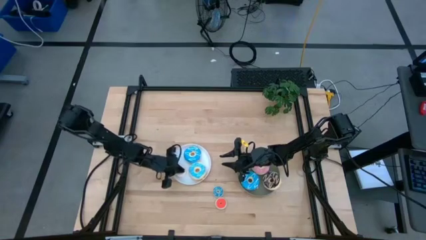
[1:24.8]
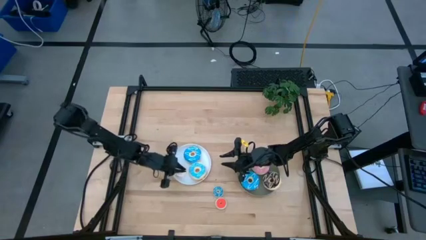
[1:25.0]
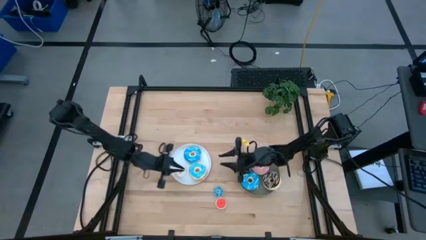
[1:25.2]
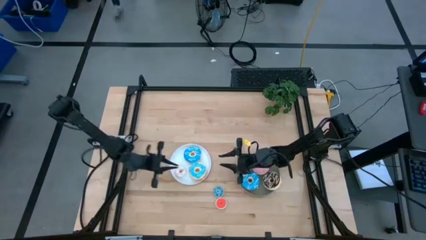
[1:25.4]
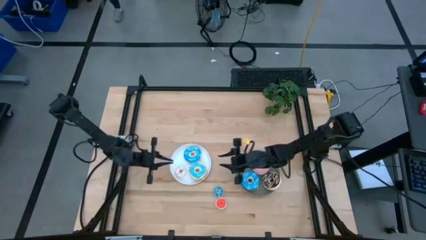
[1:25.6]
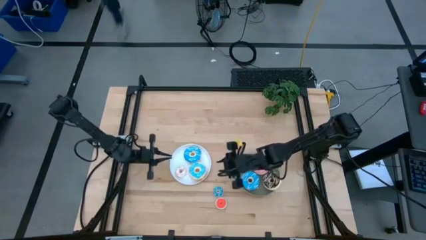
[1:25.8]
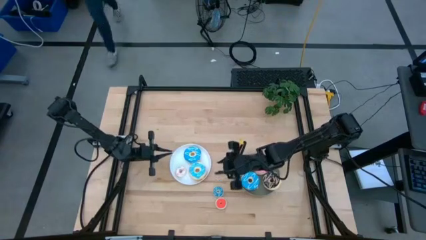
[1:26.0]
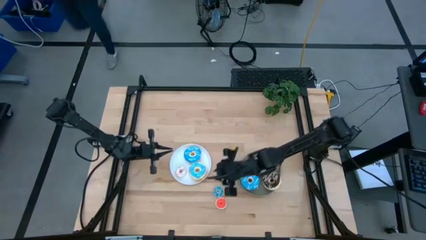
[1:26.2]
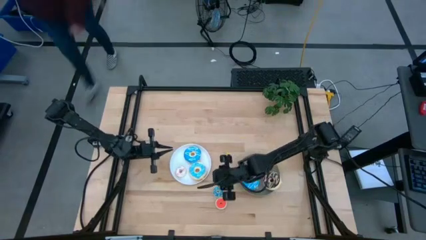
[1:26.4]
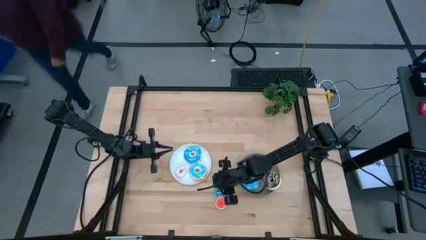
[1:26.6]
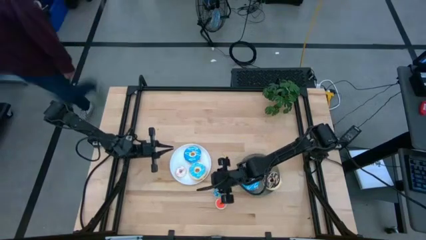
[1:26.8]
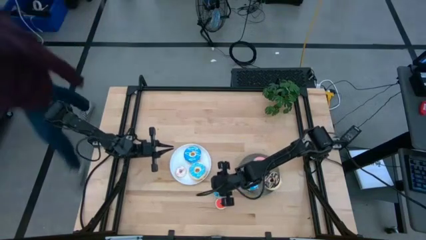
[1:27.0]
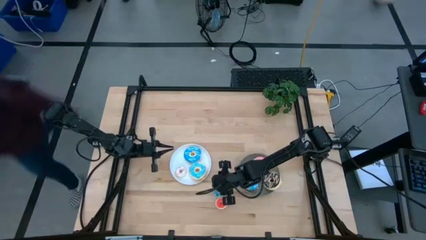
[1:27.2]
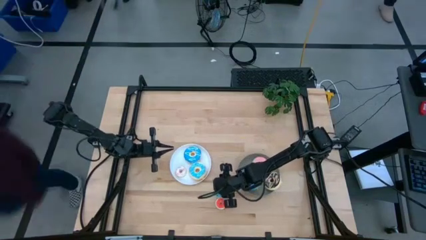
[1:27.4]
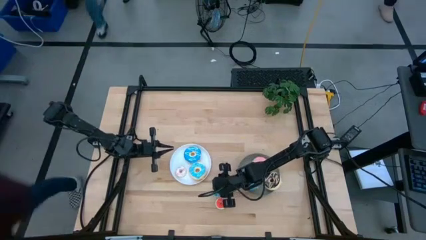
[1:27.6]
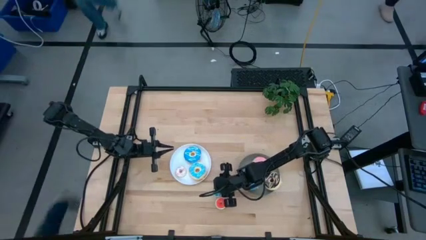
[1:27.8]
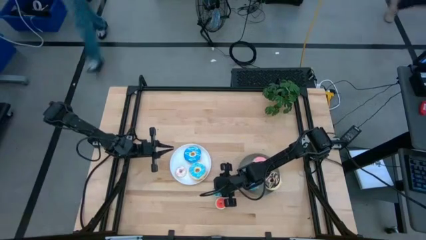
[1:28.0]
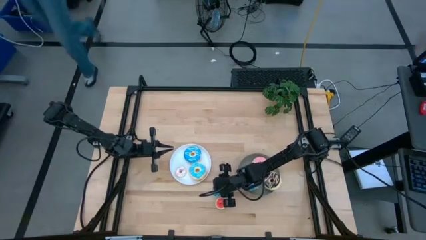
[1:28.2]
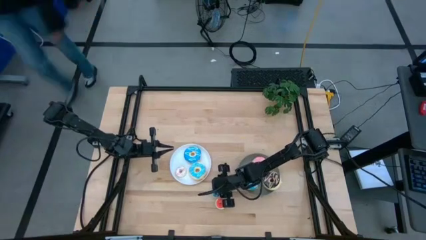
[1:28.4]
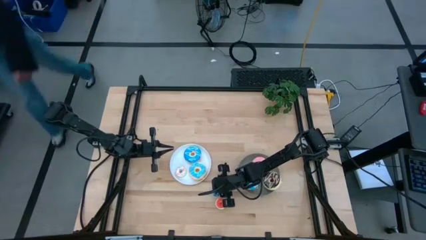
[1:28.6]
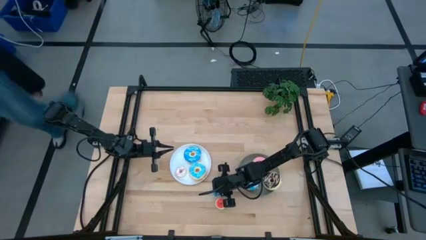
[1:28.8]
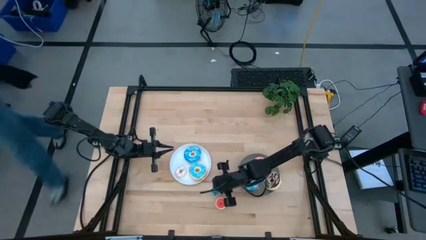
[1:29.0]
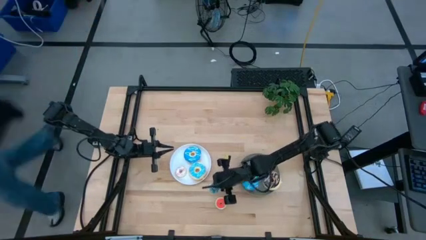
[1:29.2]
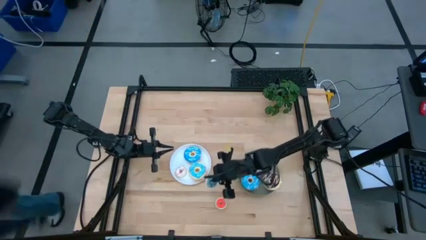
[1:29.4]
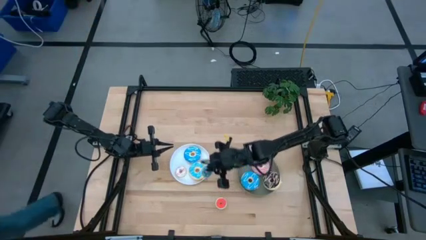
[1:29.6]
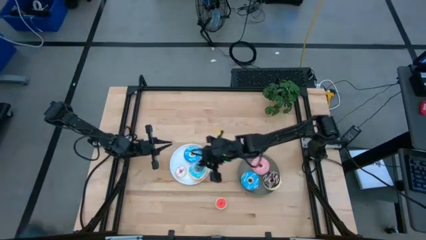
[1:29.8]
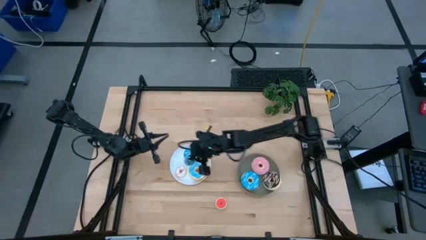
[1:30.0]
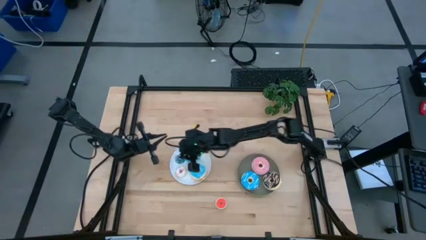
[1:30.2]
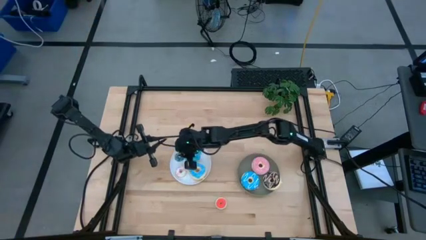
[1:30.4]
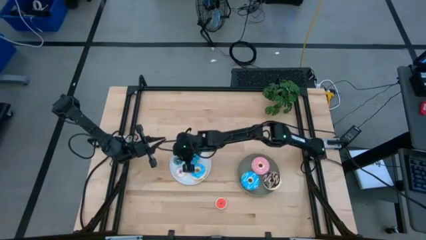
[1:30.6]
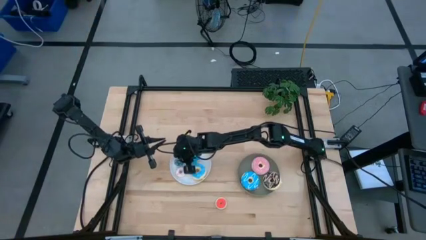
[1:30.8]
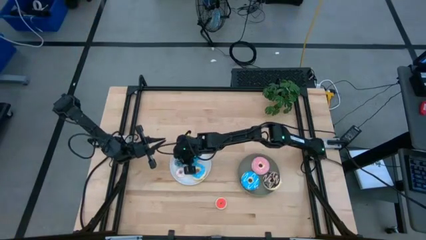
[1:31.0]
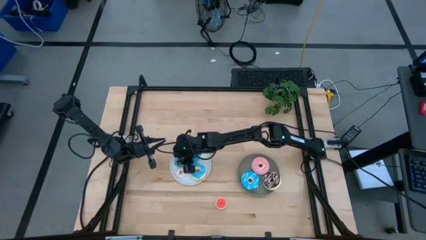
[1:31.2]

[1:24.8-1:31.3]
Task: Pick & Place donuts
Put the small blue donut on the white plate

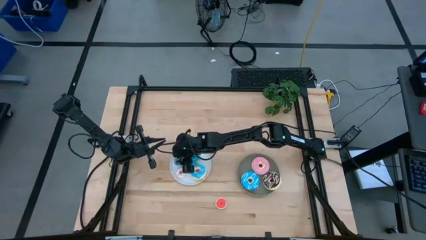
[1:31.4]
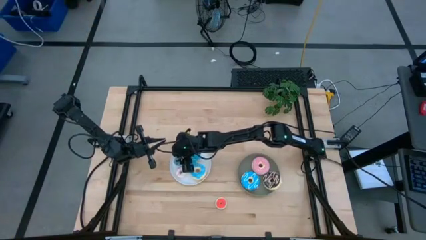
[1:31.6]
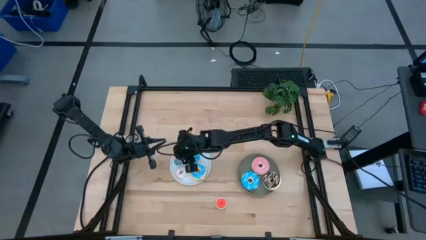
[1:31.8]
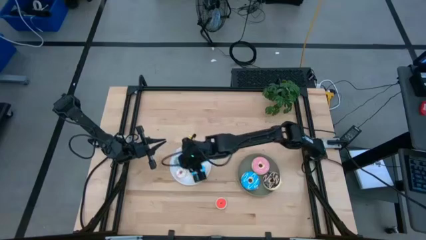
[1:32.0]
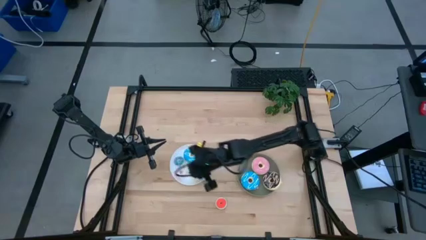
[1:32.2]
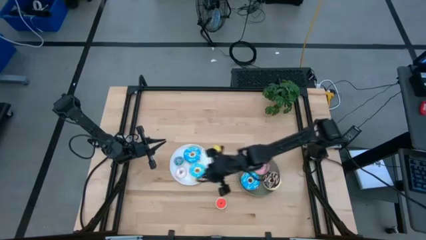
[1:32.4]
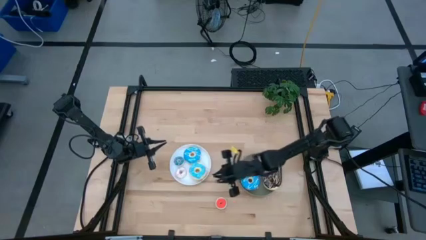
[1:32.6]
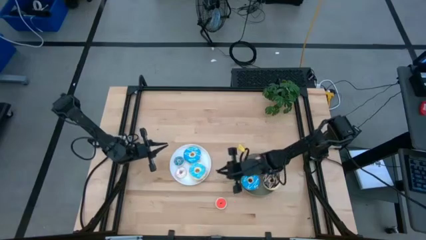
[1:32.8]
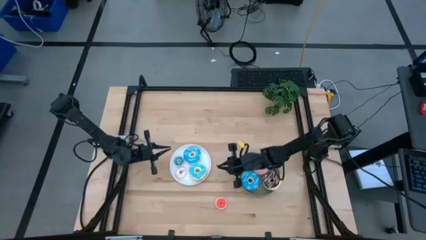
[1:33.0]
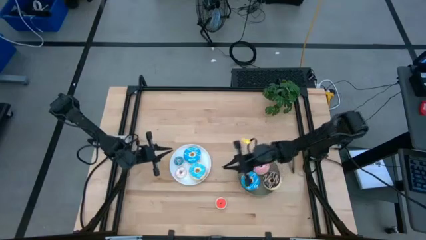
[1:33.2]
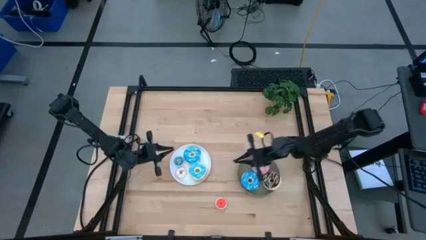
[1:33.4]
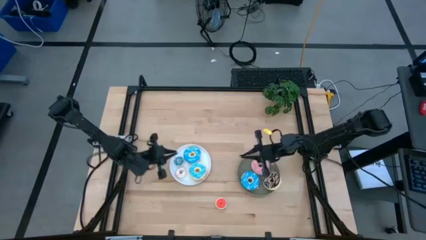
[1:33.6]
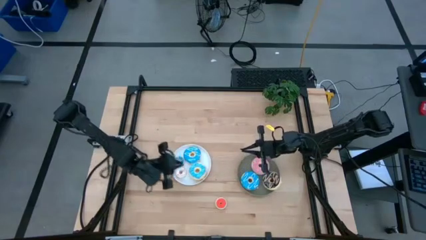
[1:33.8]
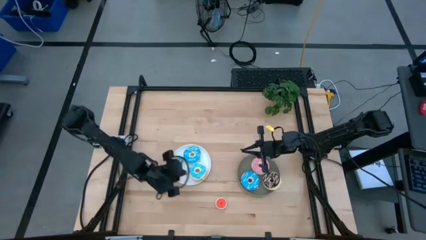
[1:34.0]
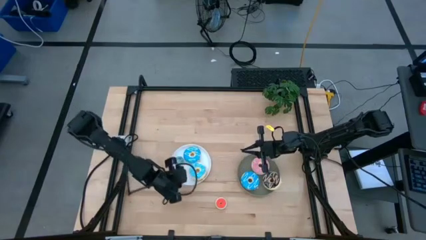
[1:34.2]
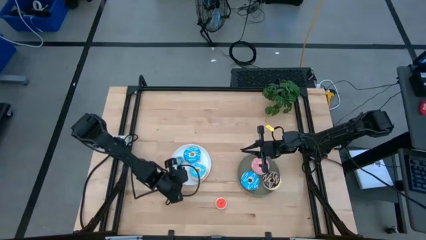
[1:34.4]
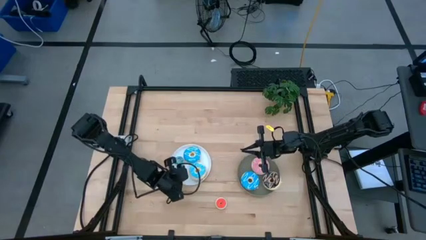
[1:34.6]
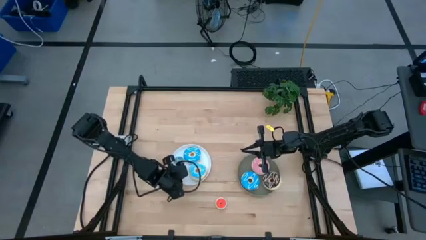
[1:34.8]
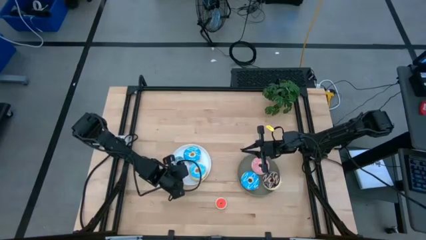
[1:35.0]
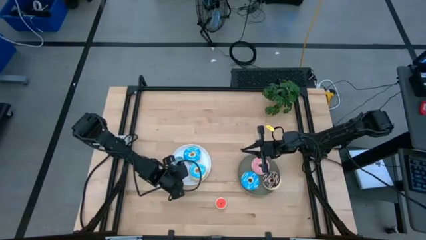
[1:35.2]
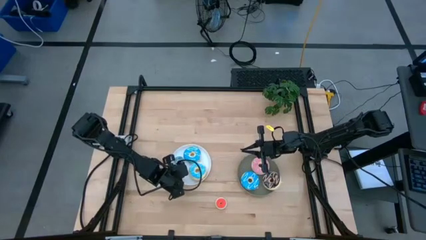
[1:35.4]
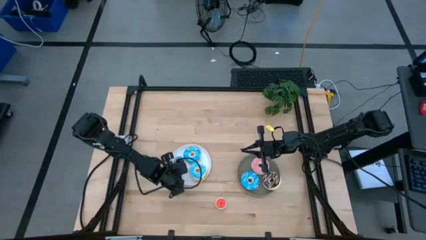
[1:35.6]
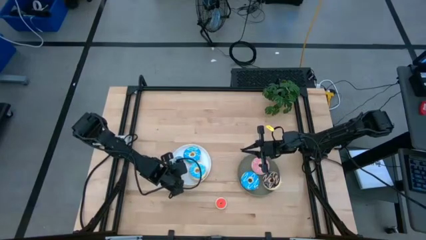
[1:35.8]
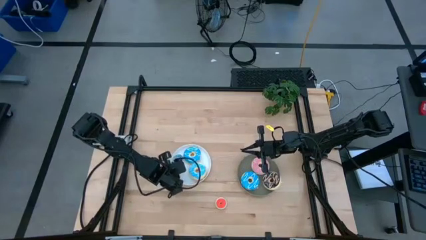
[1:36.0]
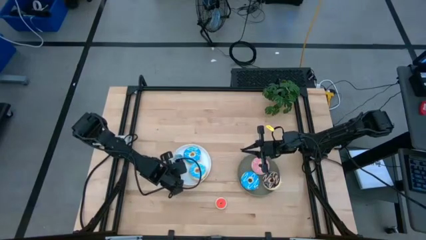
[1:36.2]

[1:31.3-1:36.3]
Adjust the small white donut on the white plate

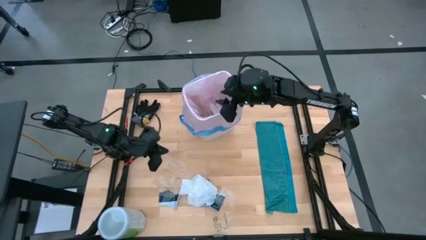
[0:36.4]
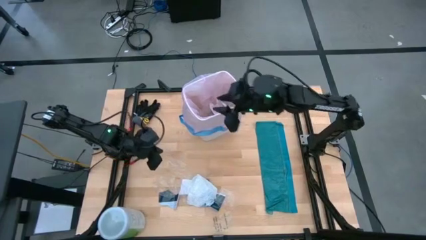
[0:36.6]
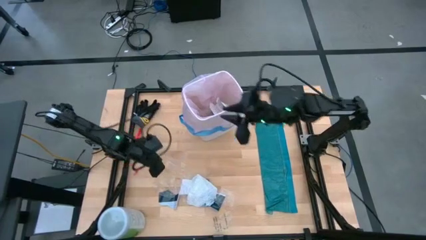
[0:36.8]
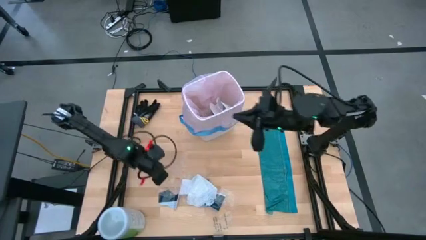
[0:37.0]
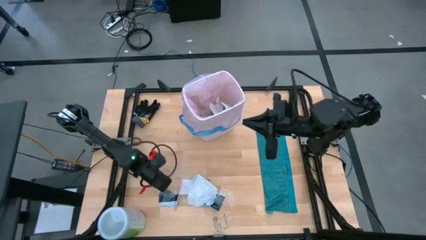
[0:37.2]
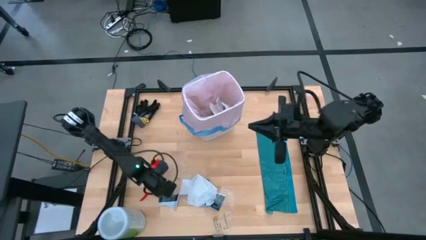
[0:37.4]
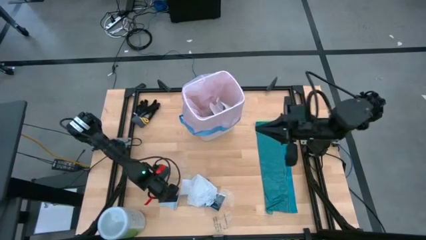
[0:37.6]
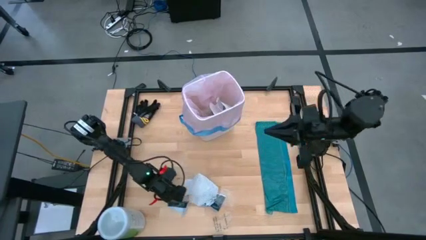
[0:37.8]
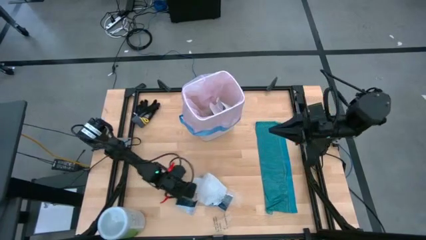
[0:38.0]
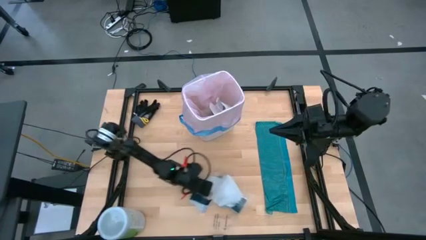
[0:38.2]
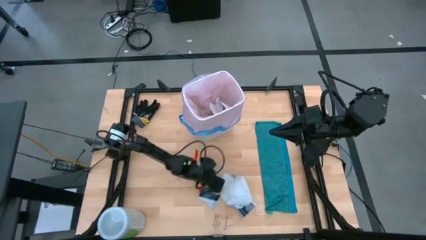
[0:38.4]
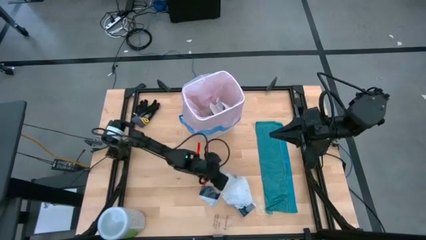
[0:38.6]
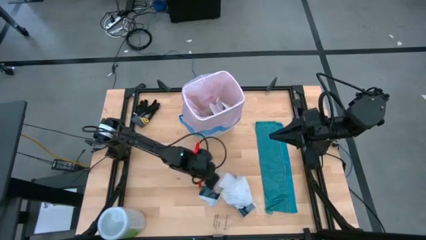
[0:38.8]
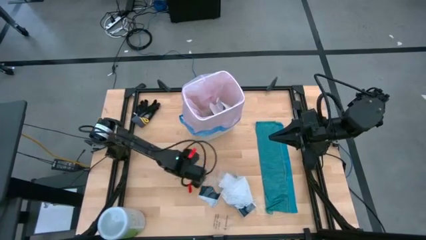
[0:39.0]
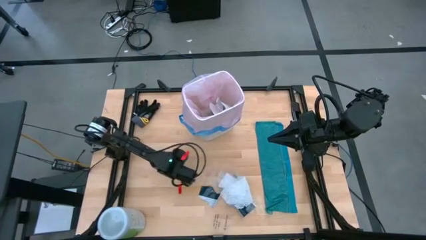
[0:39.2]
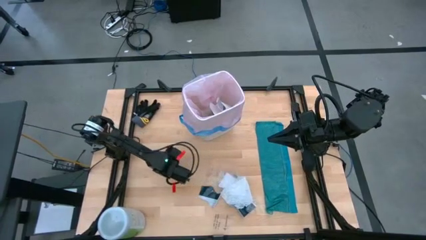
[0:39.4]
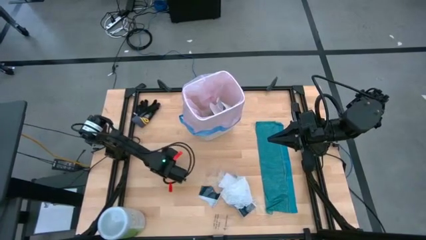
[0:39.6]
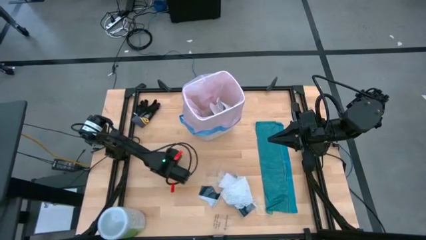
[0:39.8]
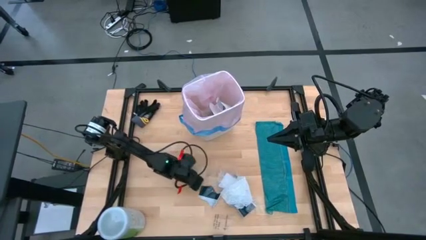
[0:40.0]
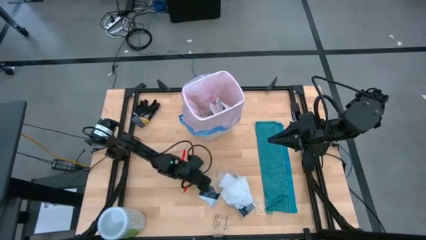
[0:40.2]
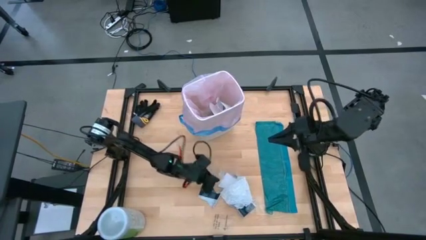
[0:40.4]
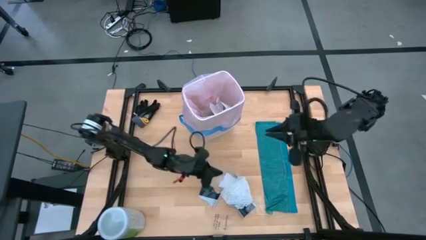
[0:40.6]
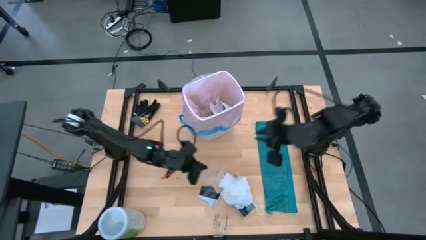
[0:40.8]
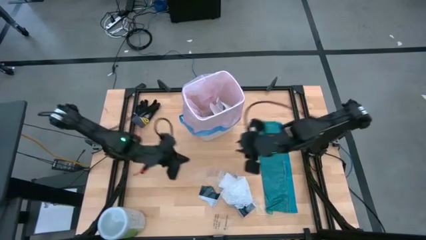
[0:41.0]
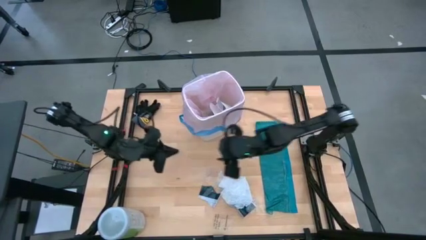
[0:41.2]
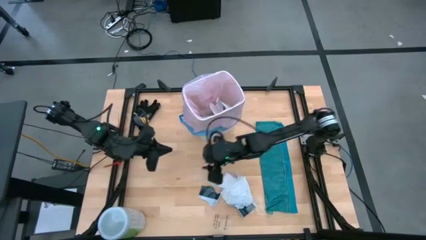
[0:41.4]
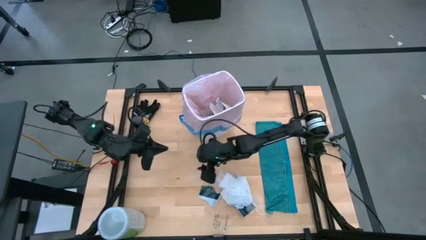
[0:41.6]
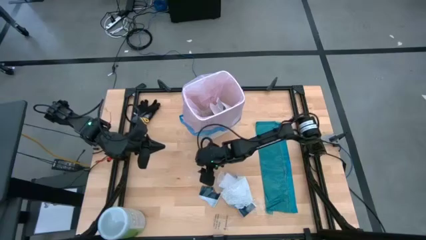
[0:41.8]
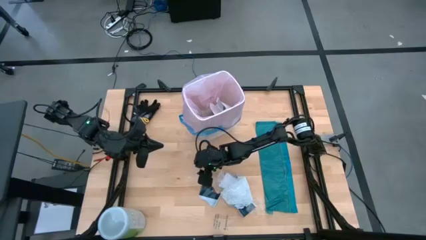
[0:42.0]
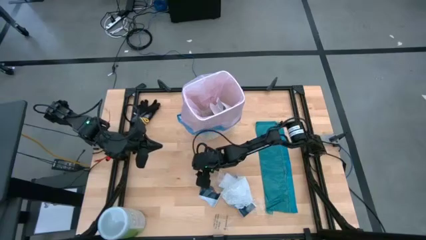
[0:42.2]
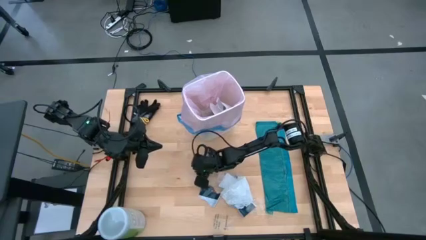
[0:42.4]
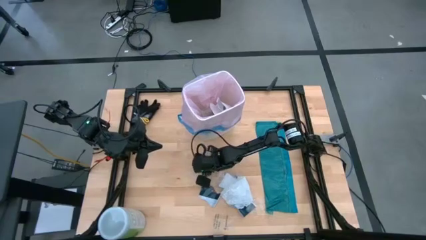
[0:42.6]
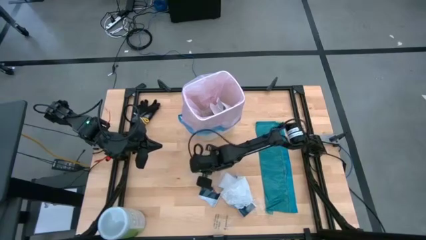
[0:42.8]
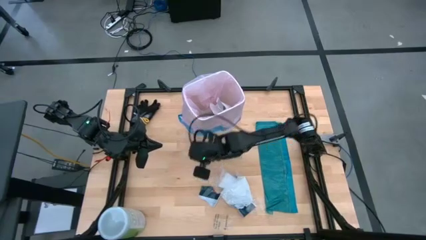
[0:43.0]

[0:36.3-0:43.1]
Task: place trash/remove bag and relplace
Put the transparent plastic into the white trash bin
